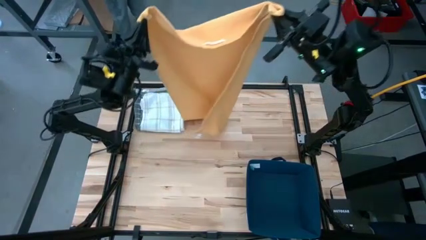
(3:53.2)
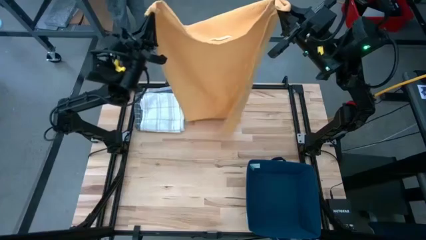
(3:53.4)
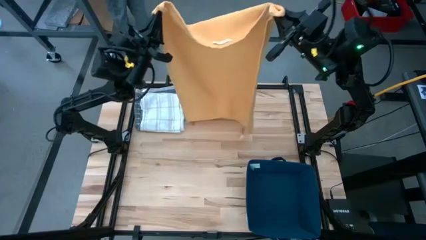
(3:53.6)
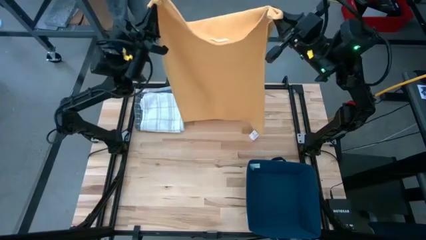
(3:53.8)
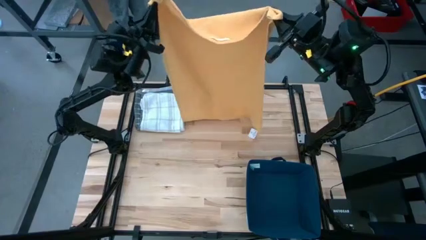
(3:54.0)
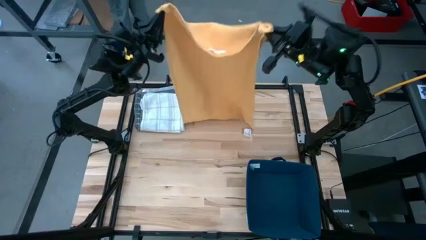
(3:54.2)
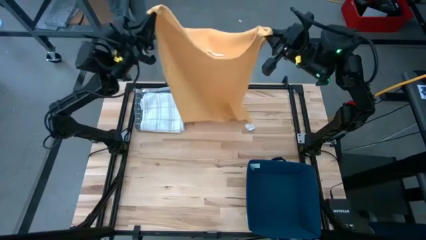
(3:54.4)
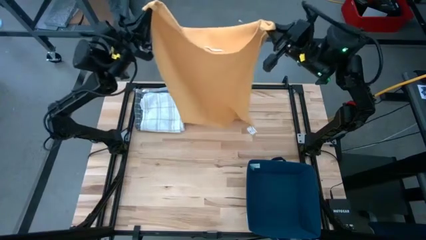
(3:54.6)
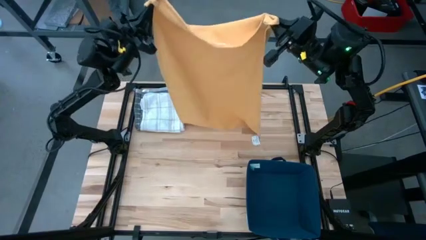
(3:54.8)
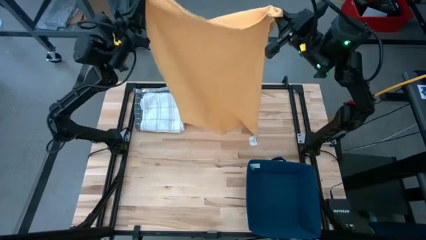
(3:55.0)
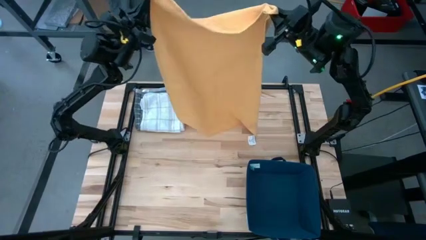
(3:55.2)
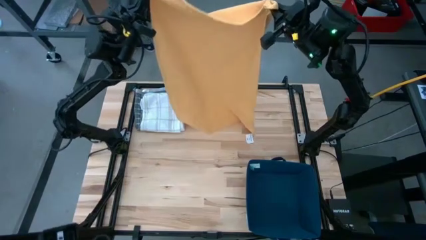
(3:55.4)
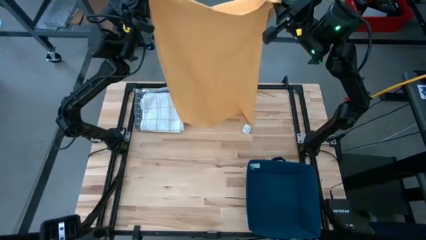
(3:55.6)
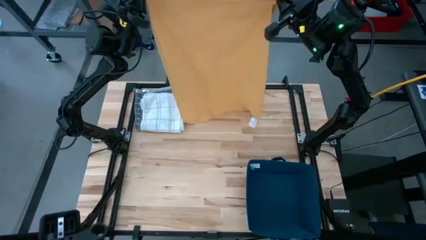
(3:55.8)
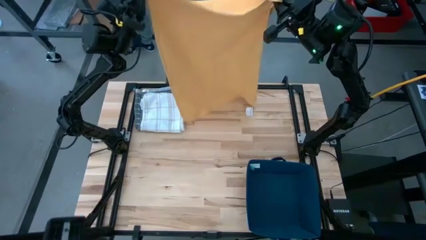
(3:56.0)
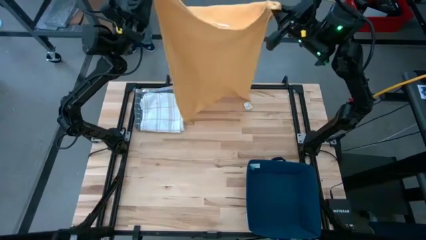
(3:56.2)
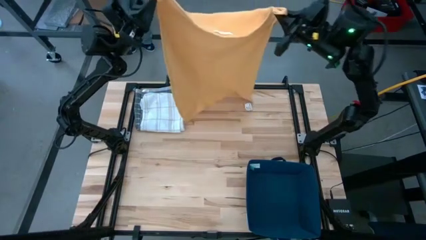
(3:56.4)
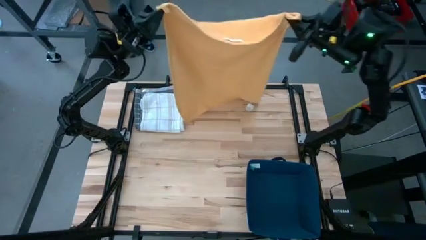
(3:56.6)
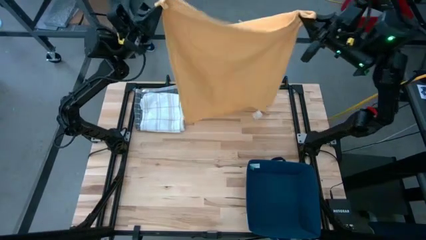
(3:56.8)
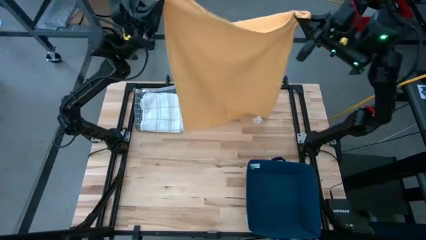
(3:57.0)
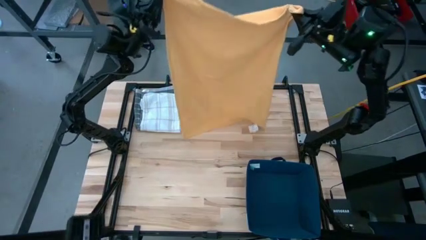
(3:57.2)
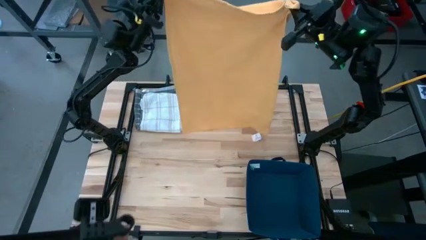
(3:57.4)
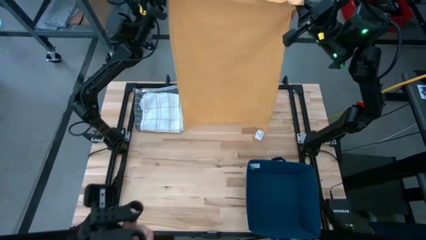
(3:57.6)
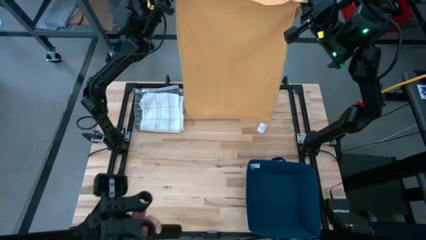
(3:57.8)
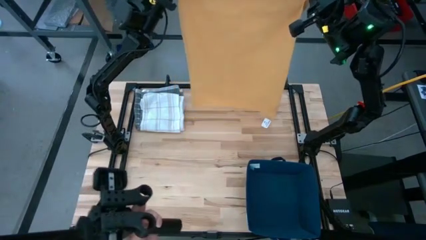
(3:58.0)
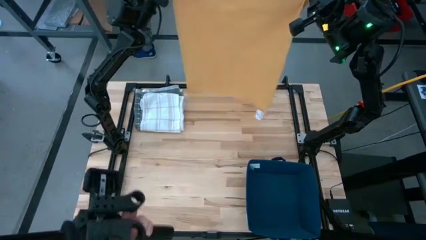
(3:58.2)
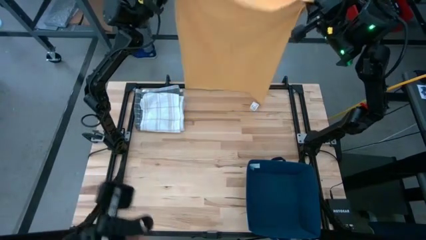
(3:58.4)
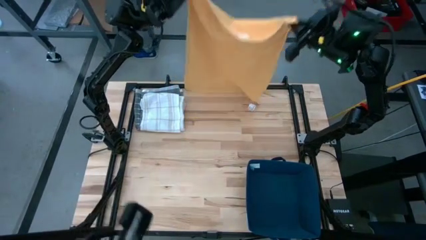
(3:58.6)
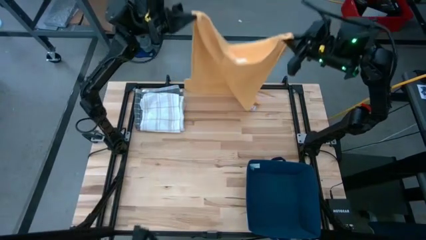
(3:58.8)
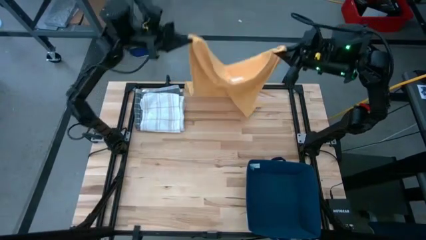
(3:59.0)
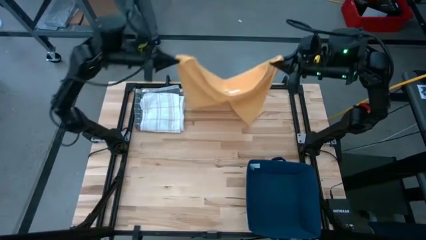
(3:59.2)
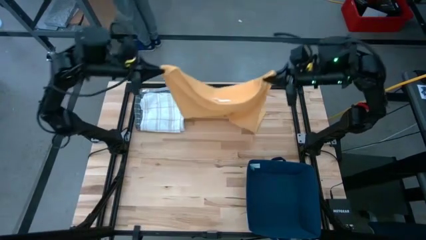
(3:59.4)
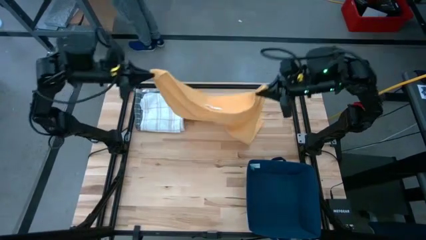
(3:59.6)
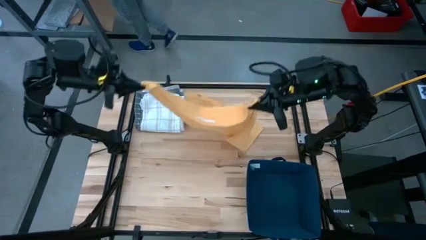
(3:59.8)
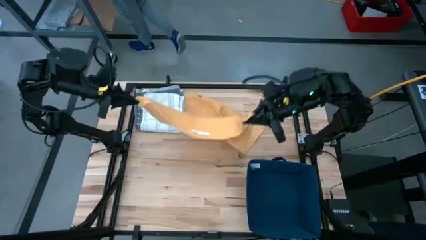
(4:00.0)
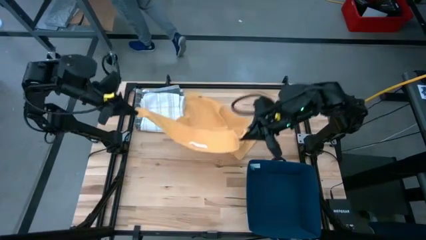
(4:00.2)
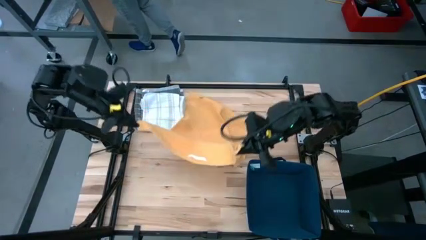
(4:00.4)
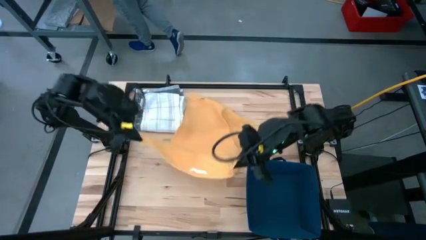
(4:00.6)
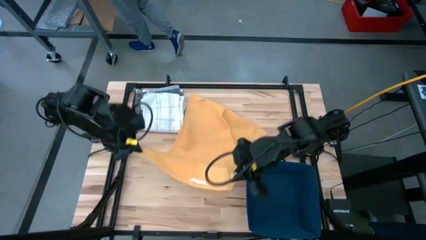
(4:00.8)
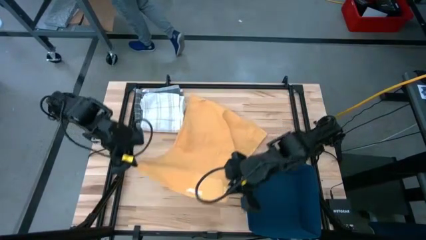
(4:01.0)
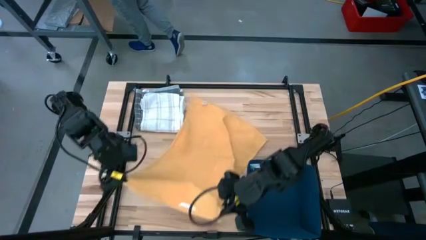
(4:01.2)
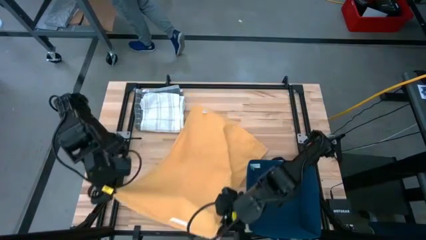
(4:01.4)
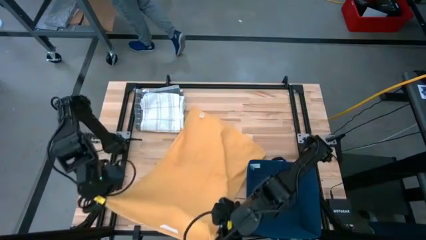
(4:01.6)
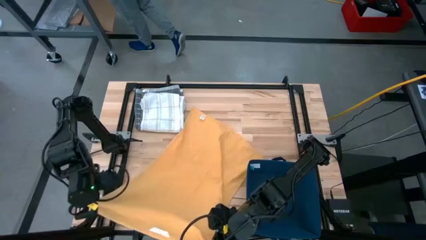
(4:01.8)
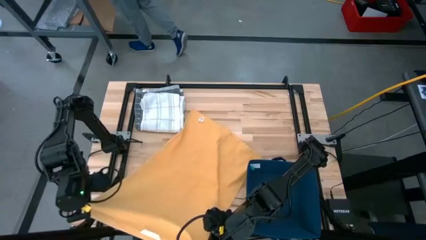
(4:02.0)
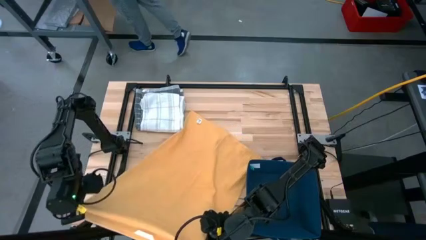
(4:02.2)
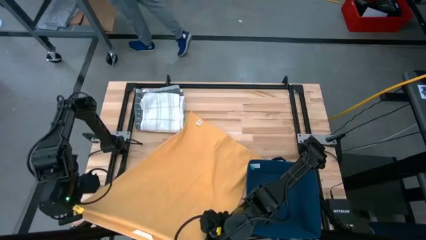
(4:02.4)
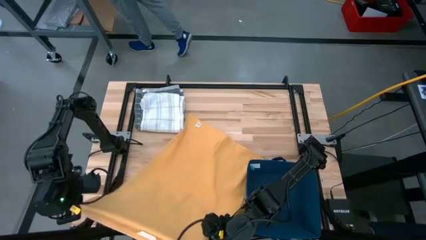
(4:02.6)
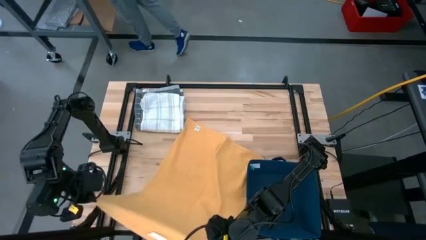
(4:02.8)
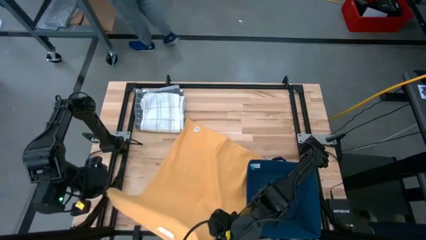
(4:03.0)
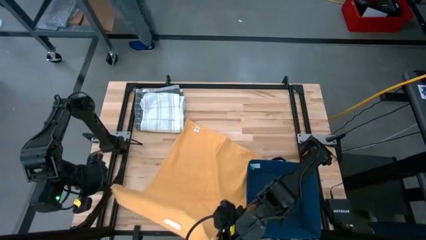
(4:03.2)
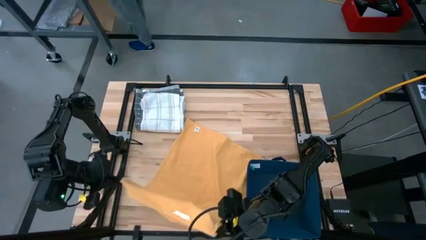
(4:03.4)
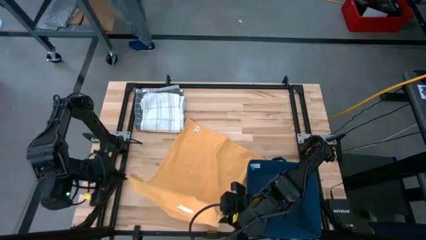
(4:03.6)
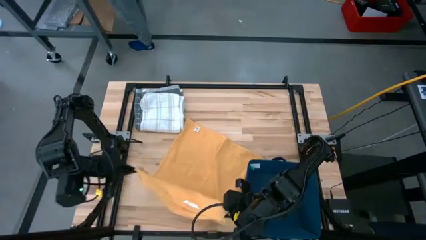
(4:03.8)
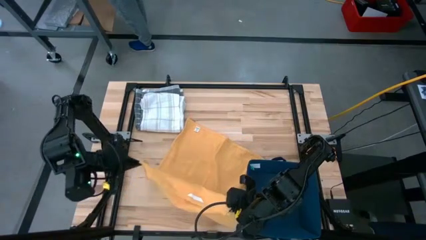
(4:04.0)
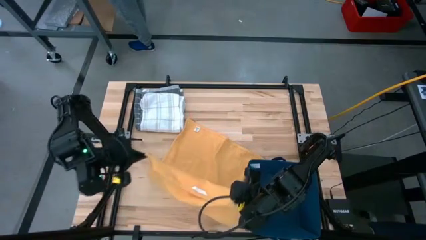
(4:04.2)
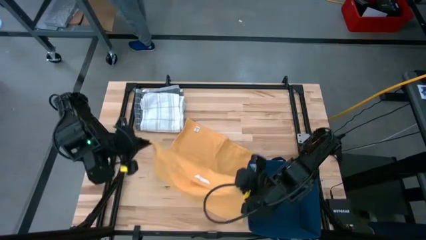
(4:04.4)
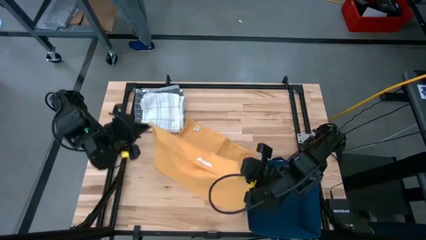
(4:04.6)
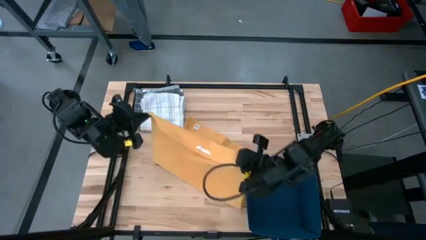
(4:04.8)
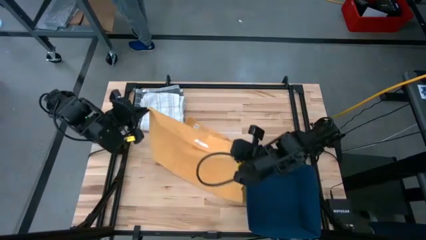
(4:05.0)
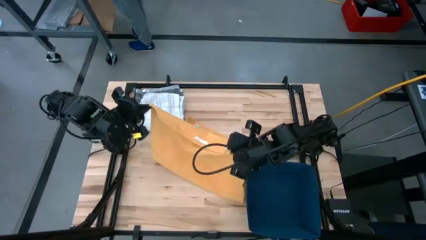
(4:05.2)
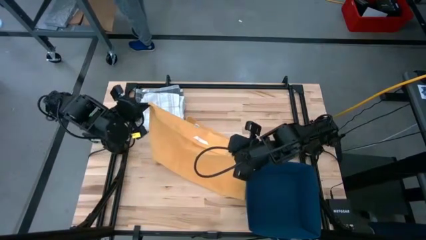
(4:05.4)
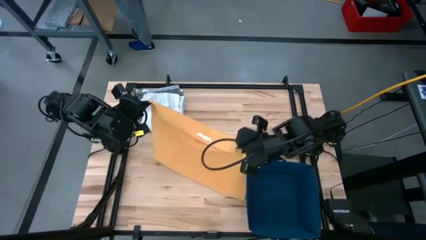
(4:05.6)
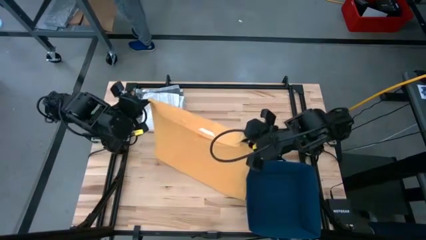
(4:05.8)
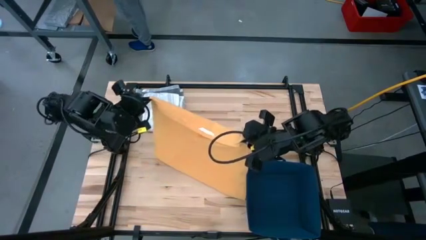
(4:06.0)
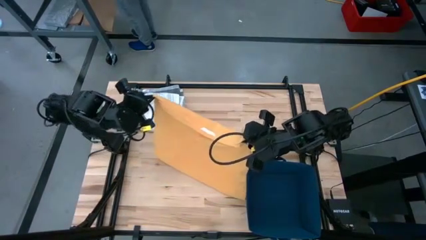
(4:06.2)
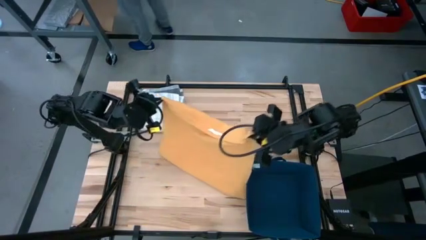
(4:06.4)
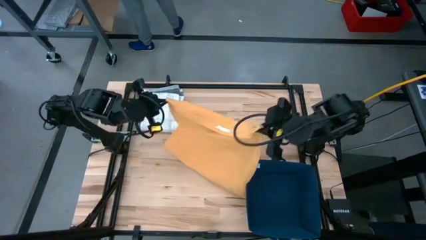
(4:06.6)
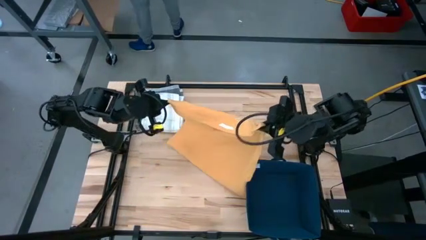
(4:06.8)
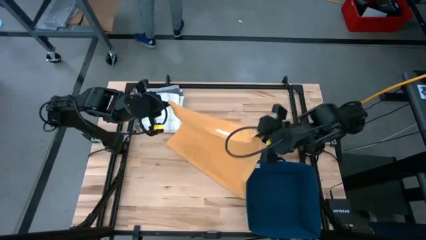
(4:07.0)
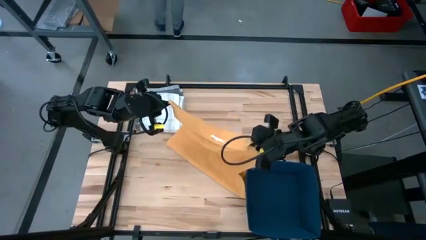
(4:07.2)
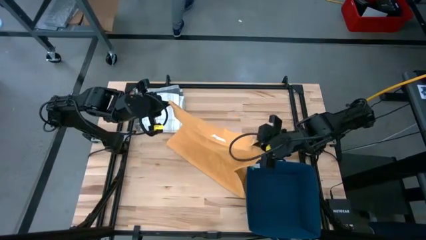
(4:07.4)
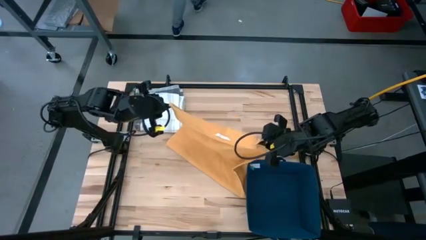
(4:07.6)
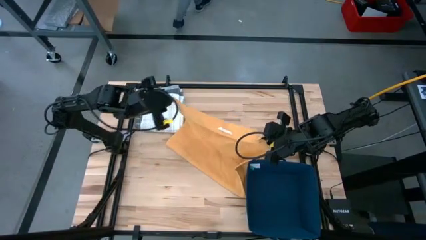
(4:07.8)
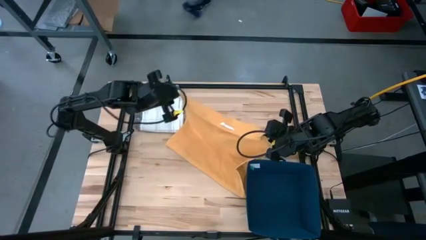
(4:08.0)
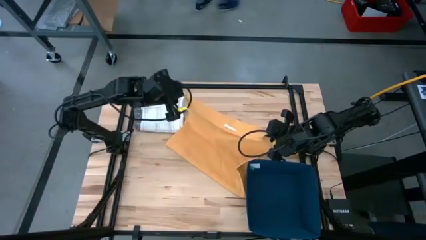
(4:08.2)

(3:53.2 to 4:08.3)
Task: Fold towel
Fold the yellow towel

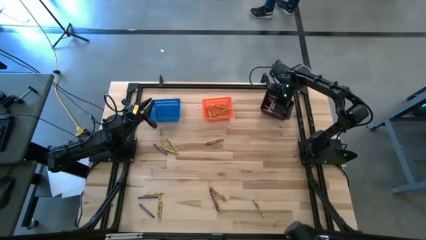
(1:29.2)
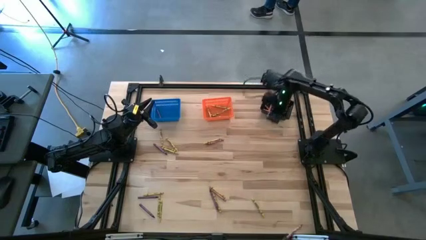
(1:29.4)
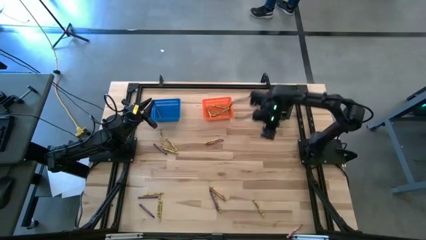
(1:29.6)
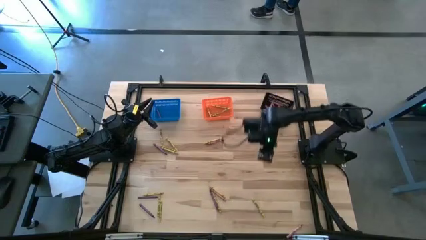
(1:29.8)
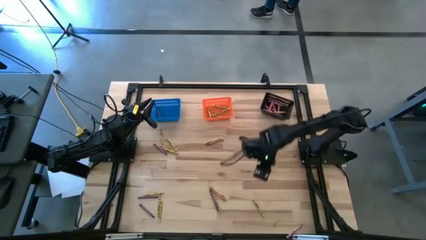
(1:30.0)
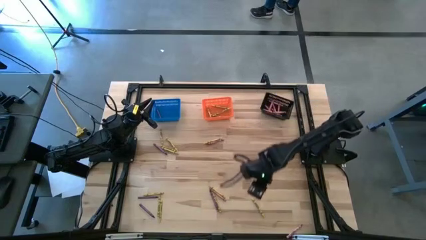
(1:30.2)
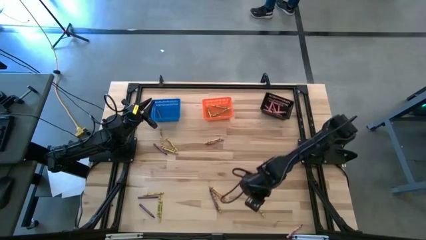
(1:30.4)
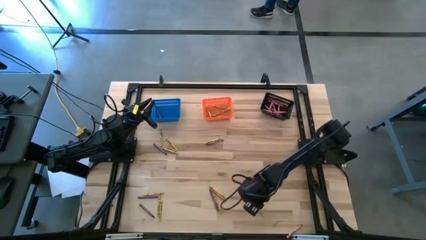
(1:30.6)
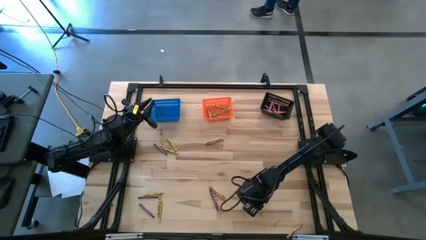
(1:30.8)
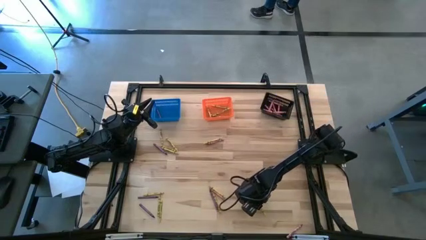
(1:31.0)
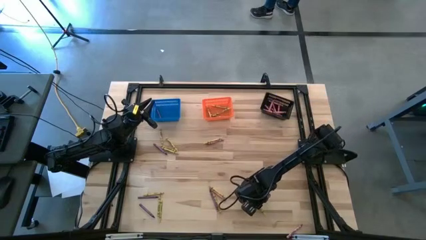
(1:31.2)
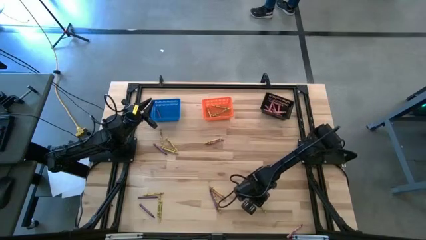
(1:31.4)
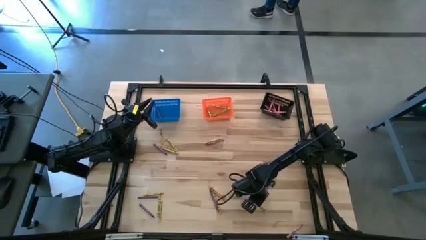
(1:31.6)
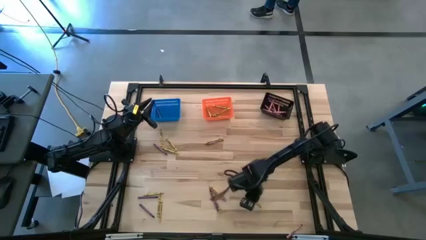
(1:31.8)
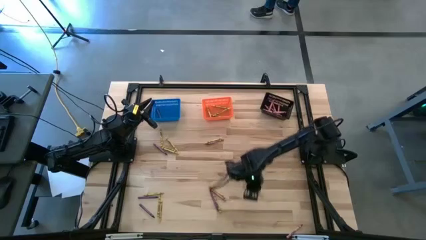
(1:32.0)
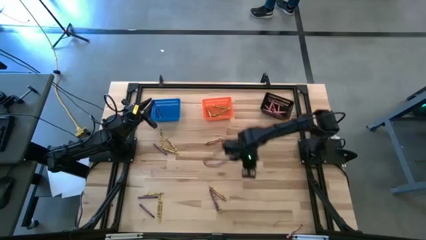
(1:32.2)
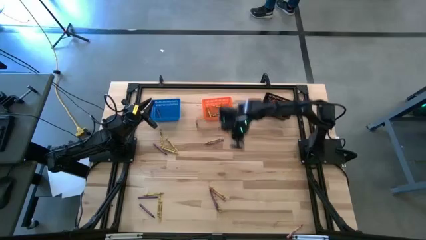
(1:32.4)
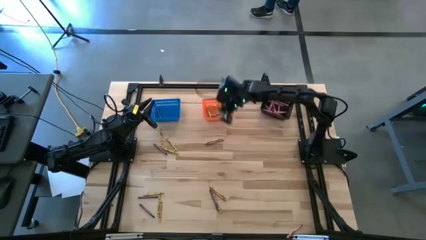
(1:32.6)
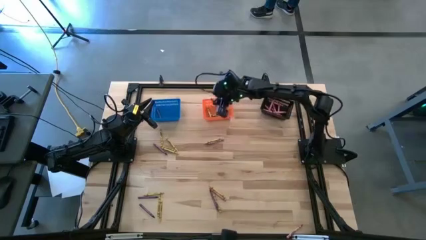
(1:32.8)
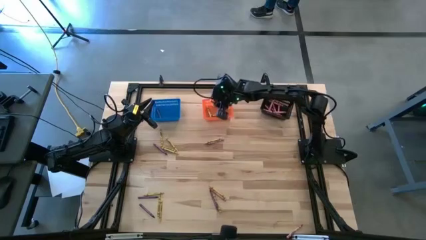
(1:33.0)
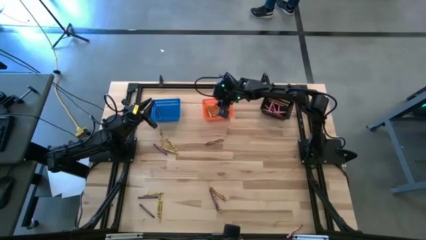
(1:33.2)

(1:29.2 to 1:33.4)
Task: Sort crayons
Put the yellow crayon into the orange bin
